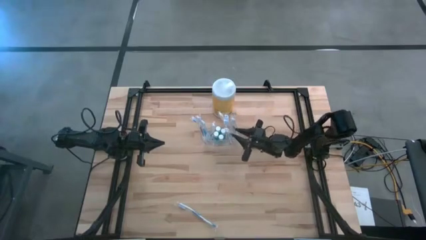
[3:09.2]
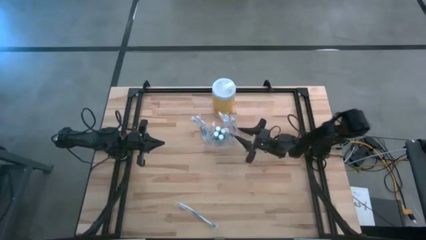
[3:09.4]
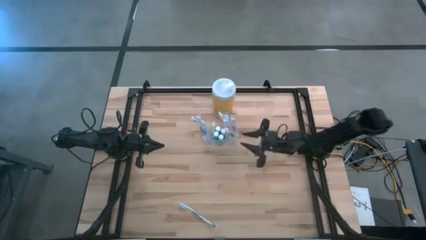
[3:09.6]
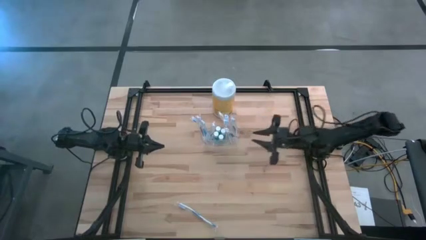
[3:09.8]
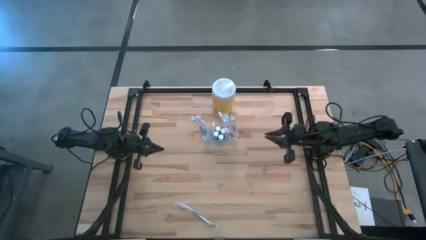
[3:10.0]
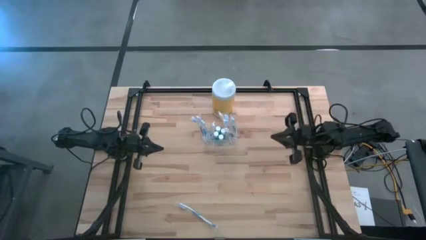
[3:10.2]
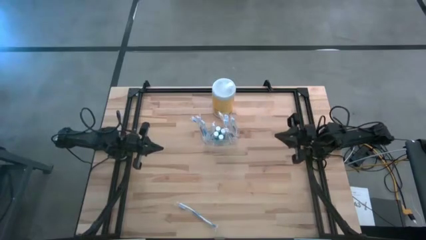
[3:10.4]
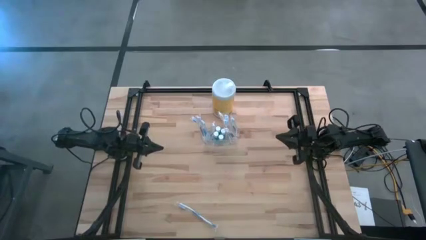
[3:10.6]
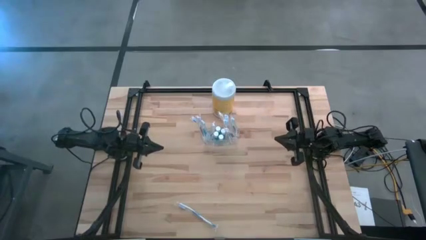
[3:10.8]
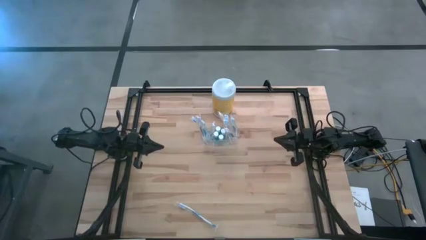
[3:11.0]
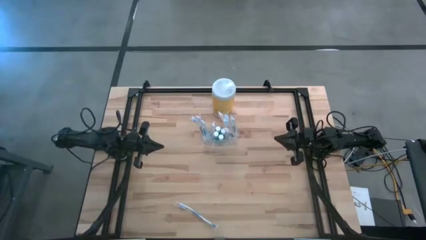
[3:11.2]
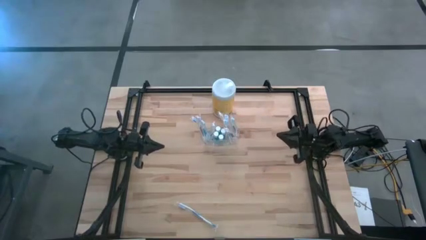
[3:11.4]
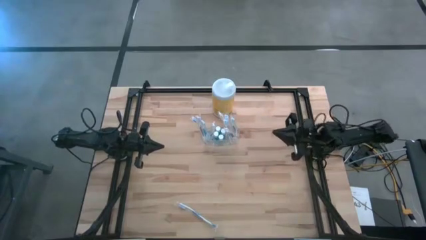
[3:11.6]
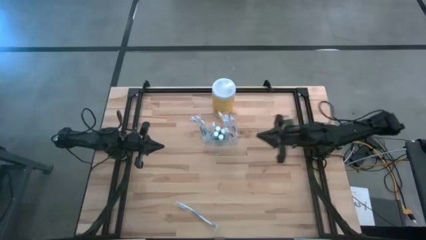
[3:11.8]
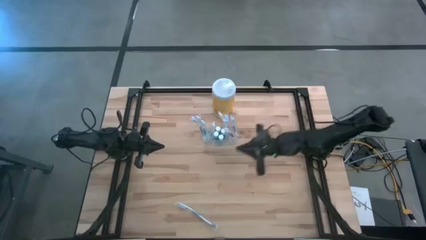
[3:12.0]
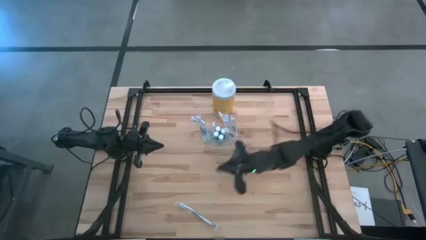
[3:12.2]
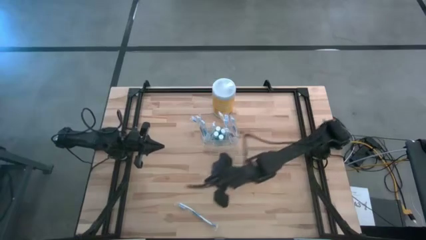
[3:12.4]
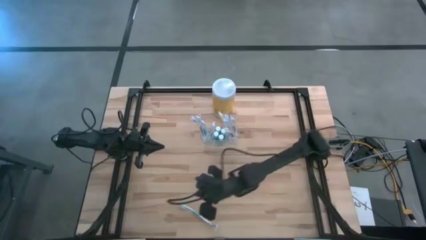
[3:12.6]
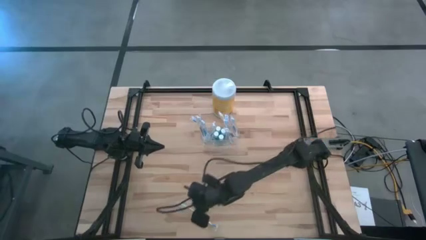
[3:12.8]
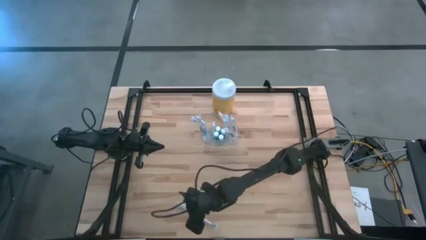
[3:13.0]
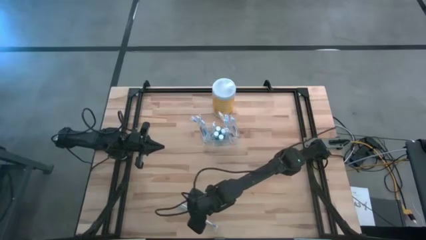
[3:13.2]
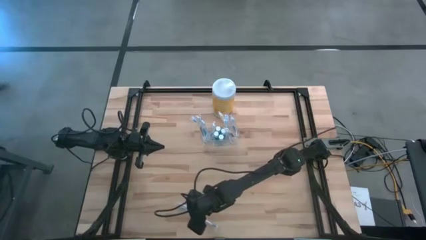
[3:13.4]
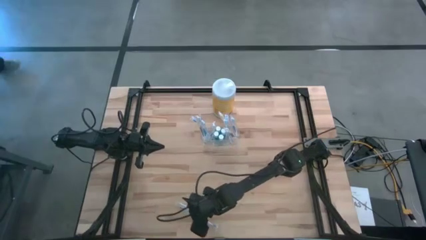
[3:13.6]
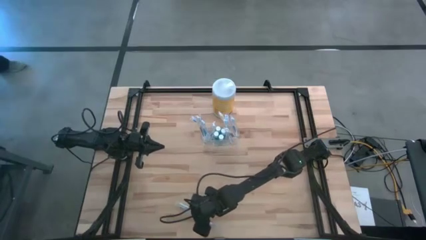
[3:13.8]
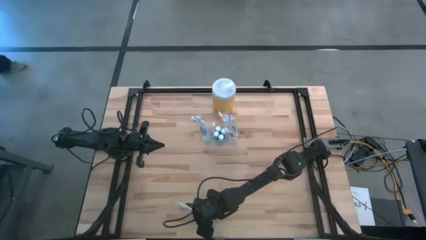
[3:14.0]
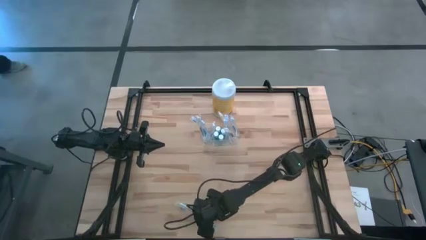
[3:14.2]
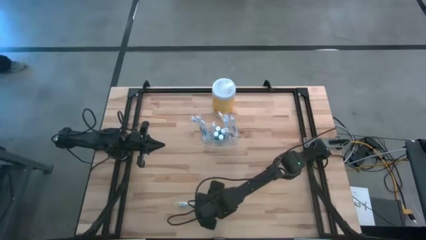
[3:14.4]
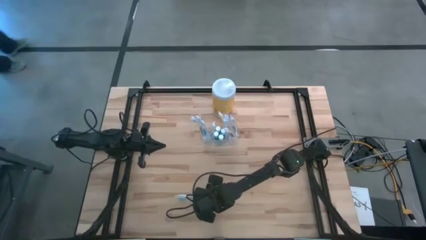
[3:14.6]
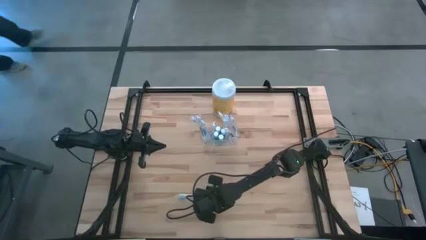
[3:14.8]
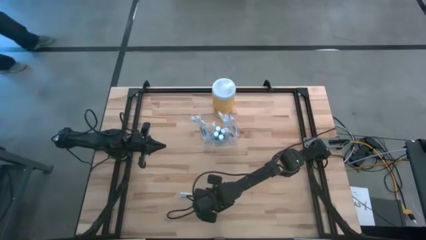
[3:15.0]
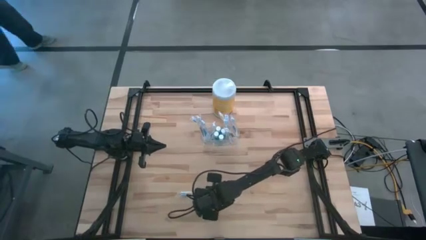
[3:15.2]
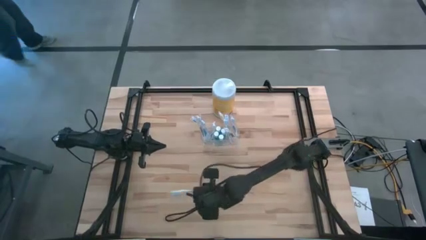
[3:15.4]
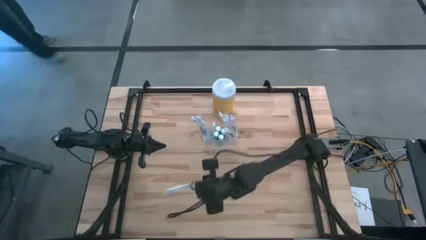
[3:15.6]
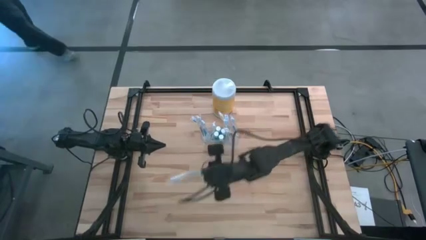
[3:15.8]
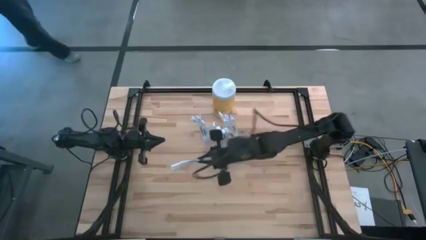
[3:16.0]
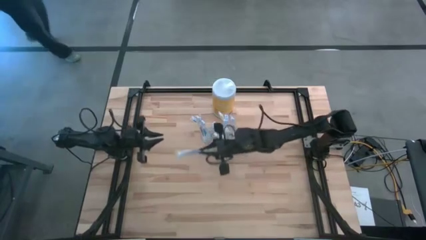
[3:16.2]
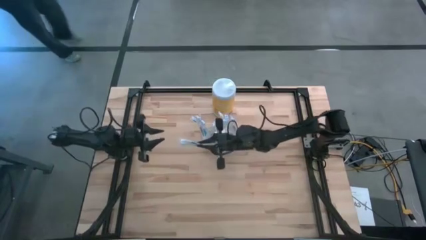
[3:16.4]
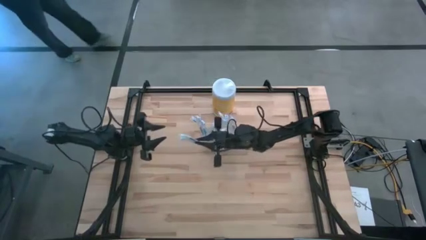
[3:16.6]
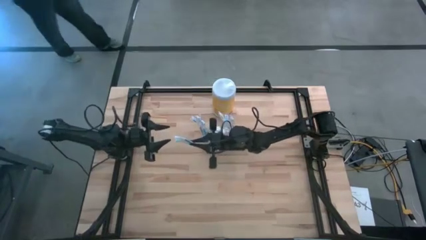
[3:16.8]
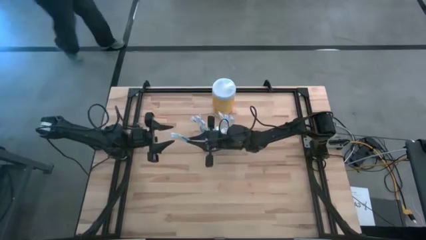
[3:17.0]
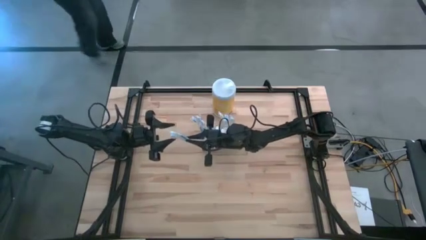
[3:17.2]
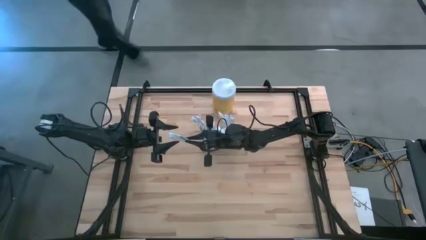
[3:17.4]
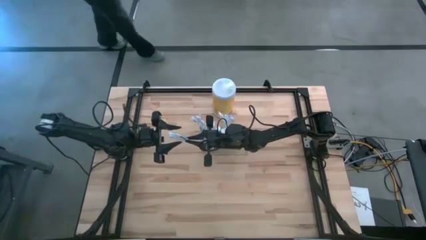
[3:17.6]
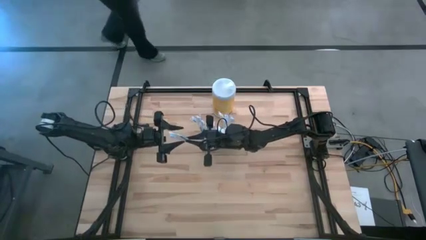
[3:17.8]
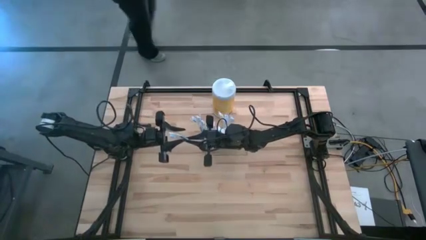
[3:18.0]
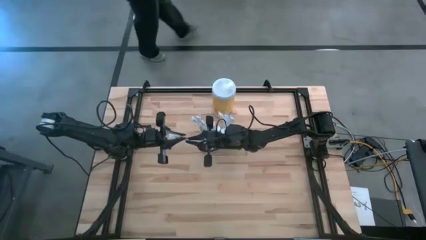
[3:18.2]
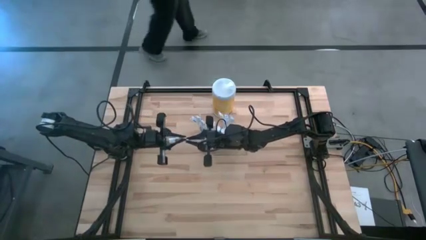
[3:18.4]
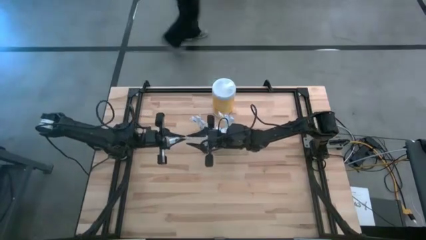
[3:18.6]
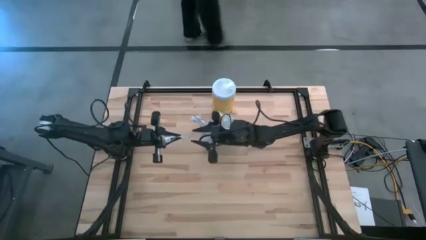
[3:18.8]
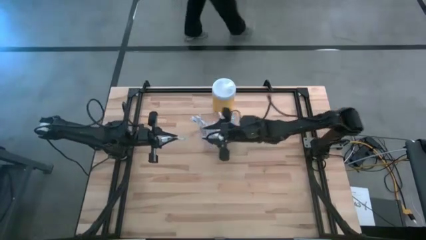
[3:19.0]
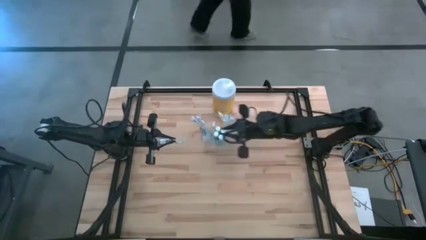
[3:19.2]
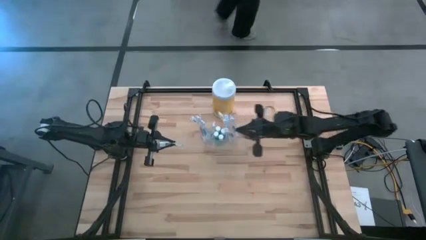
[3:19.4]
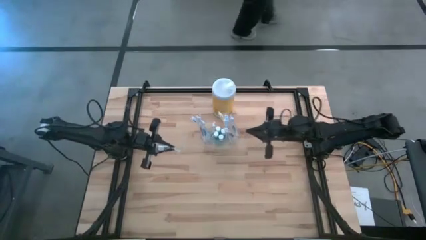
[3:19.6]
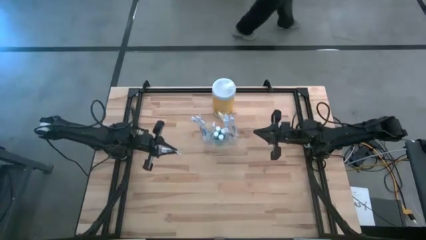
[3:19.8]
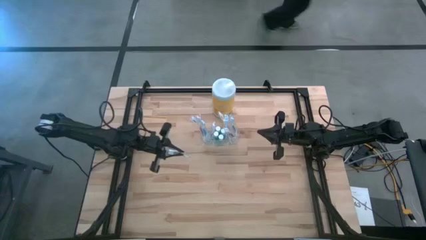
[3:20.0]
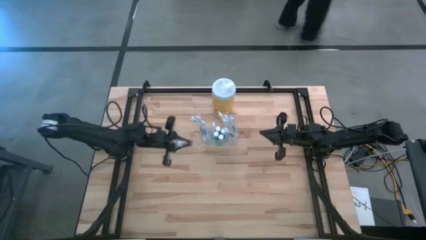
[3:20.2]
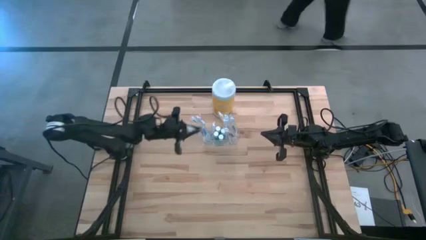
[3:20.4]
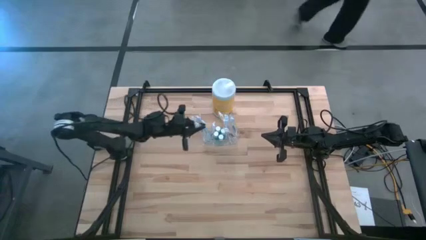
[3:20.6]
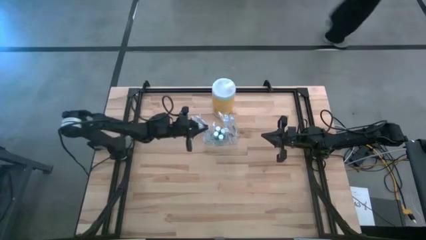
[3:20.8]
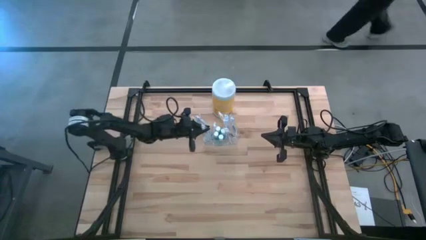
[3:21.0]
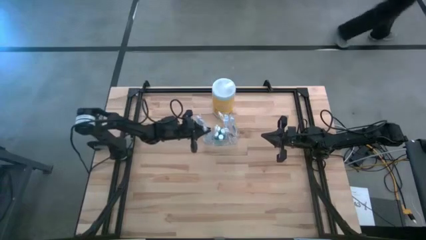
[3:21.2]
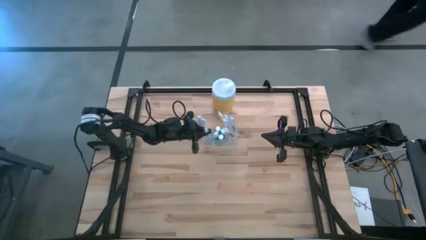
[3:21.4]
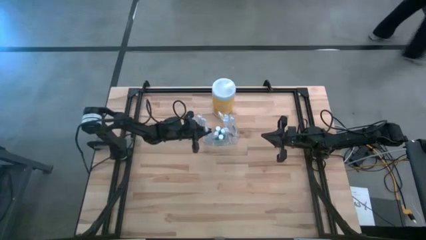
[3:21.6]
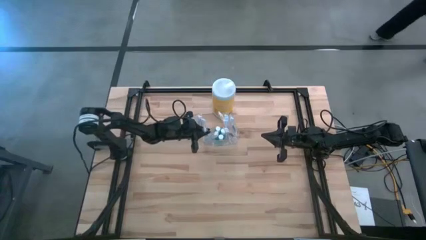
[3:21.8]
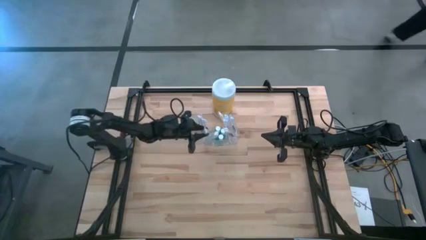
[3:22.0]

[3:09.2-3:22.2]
Task: Pick & Place toothbrushing station
Put the blue toothbrush into the transparent organizer
